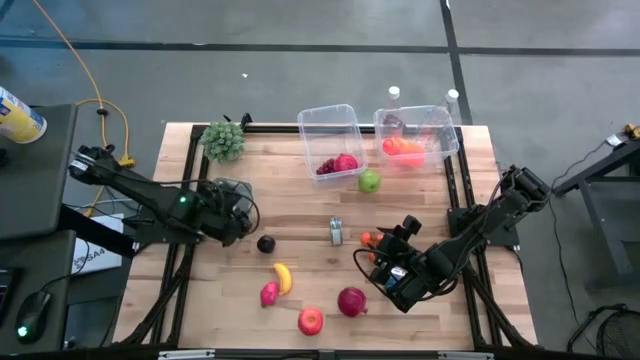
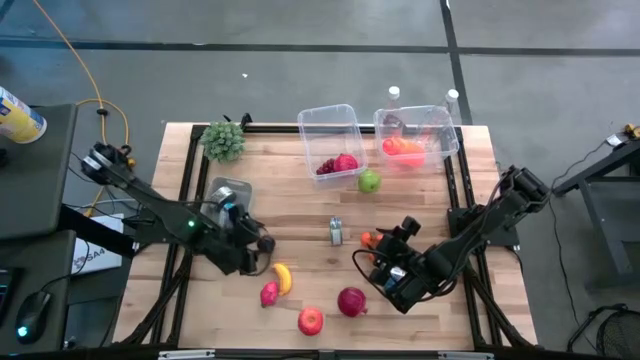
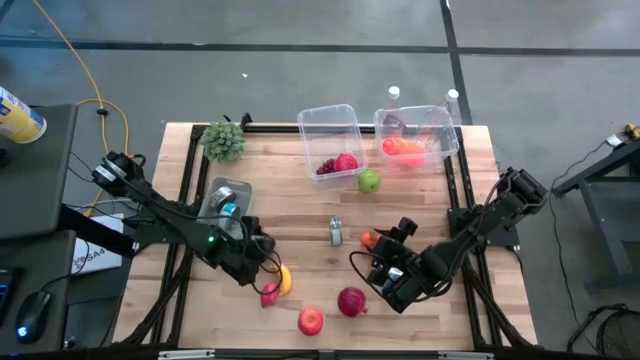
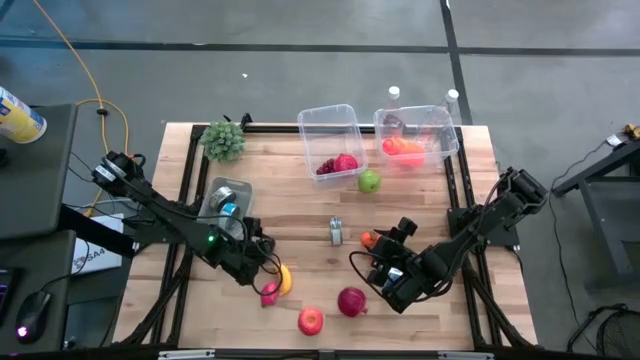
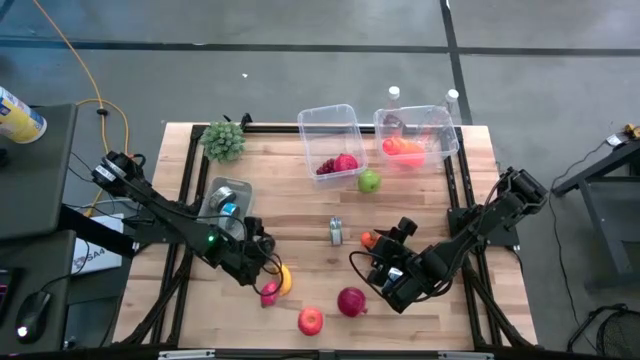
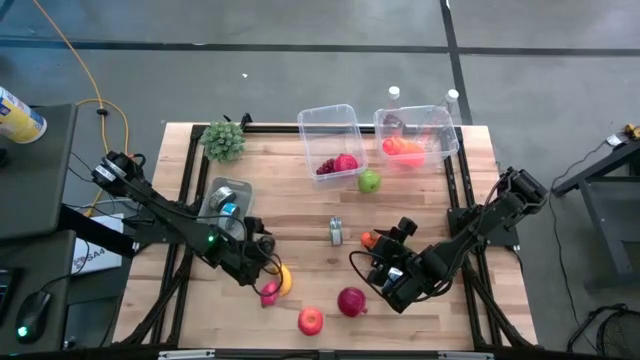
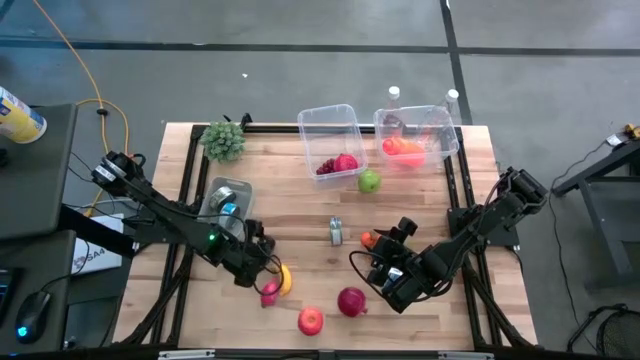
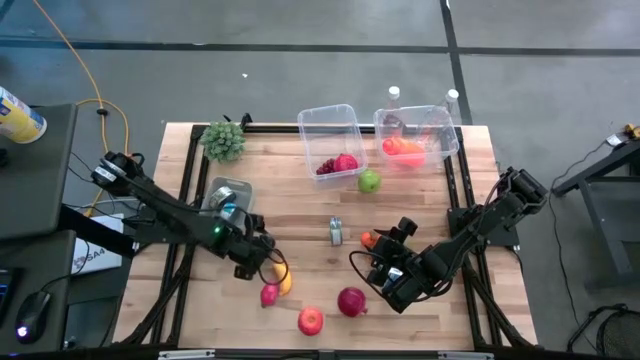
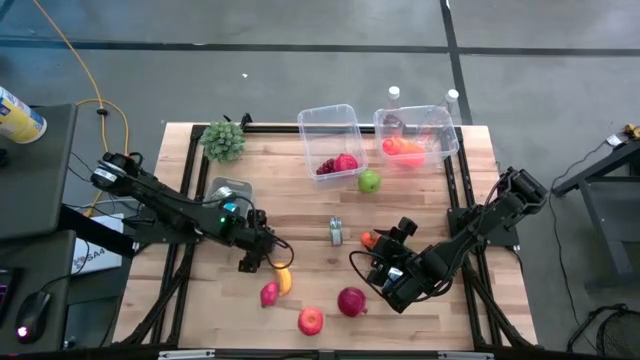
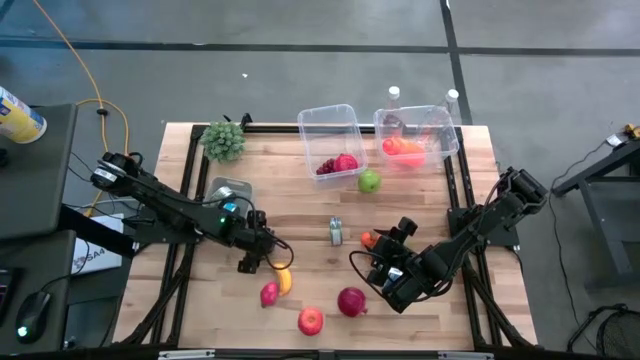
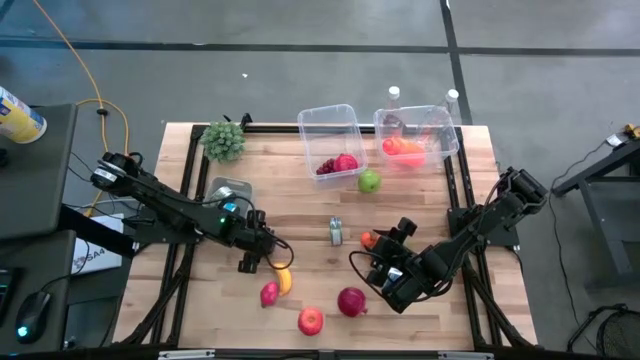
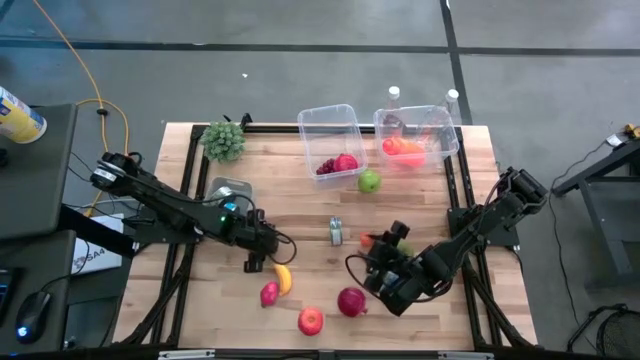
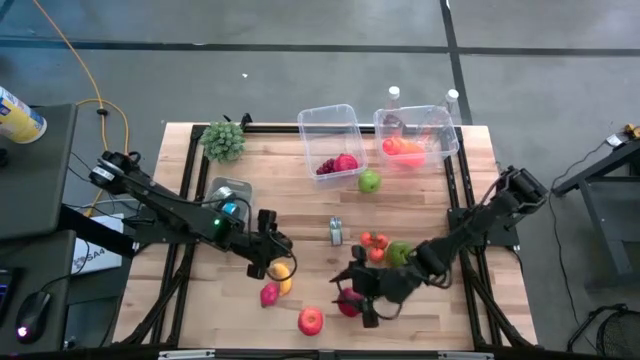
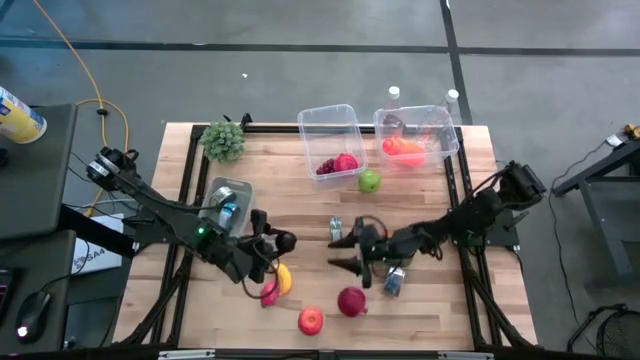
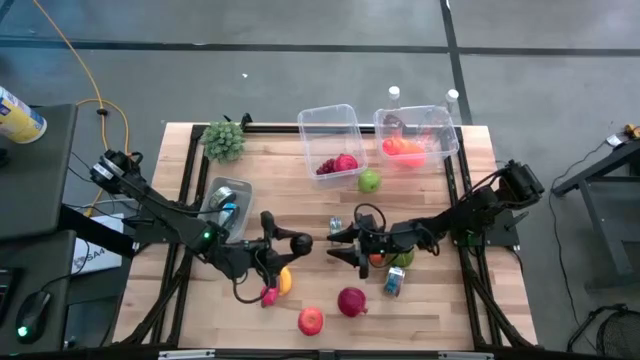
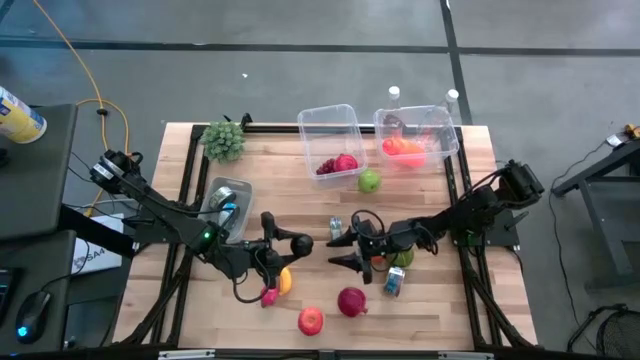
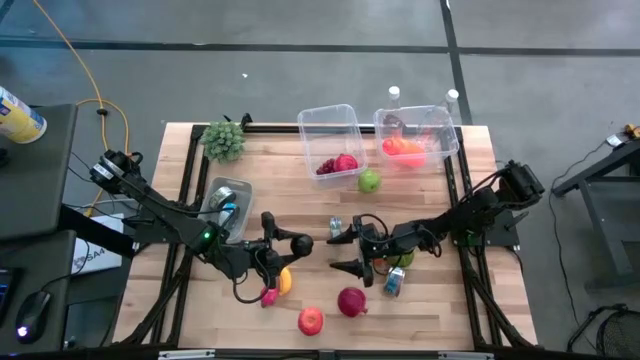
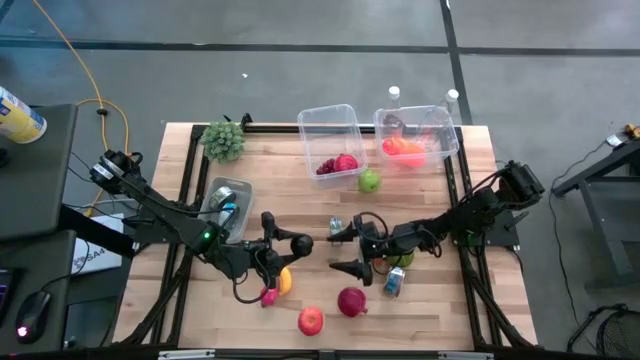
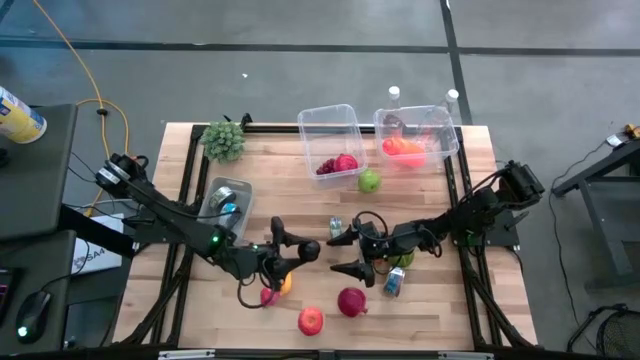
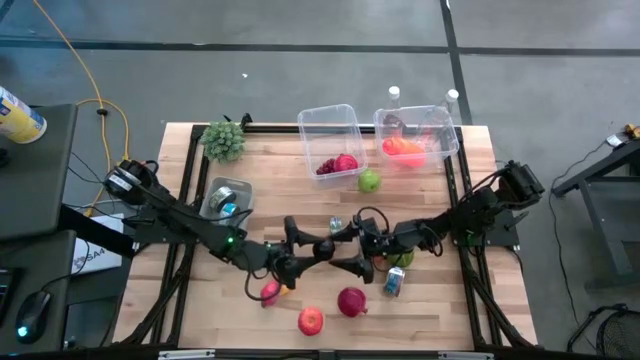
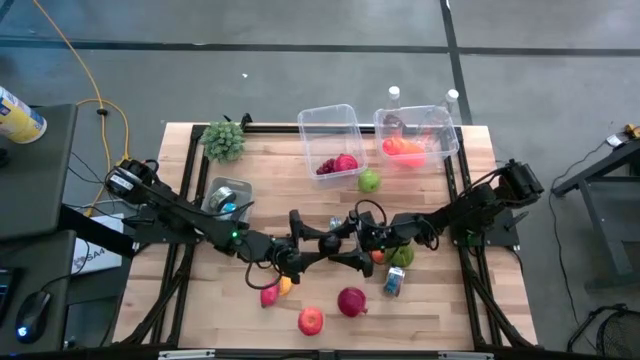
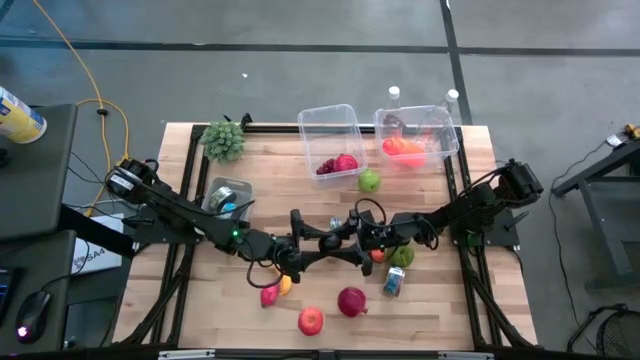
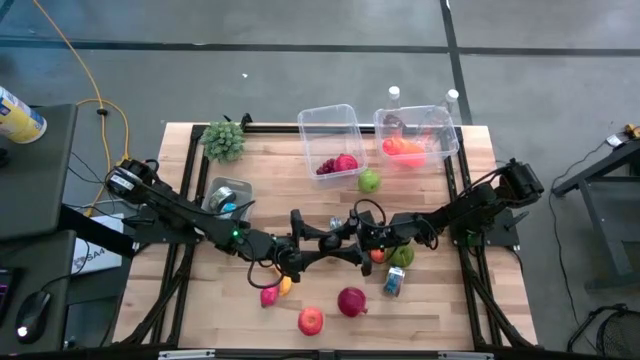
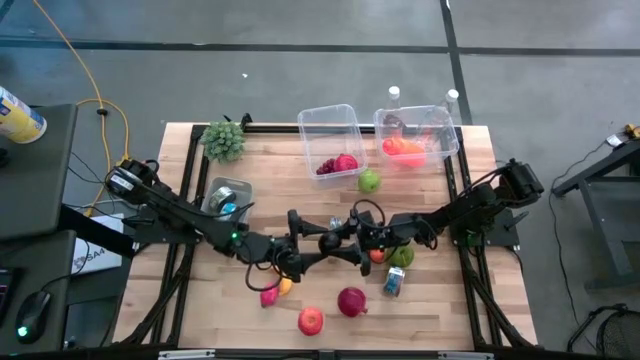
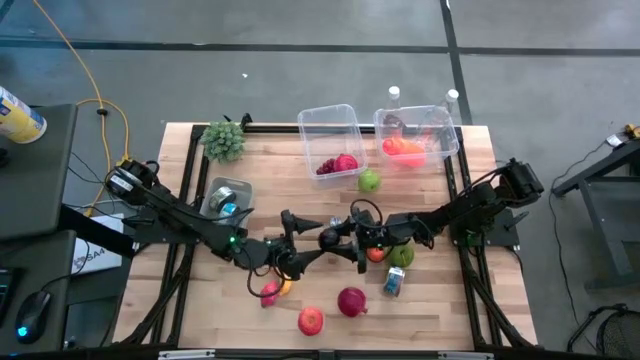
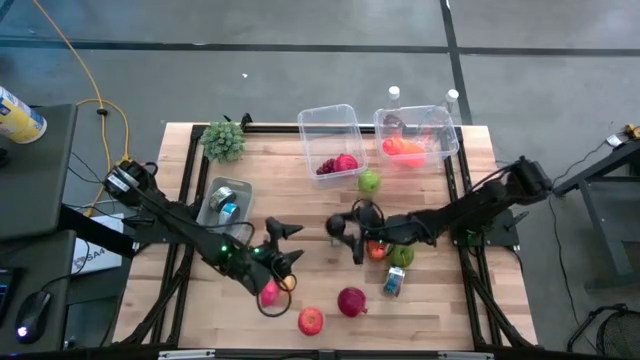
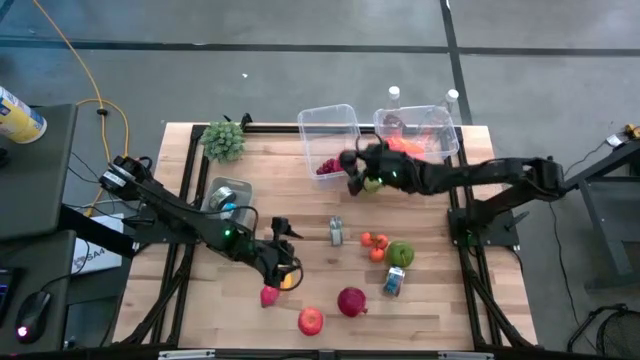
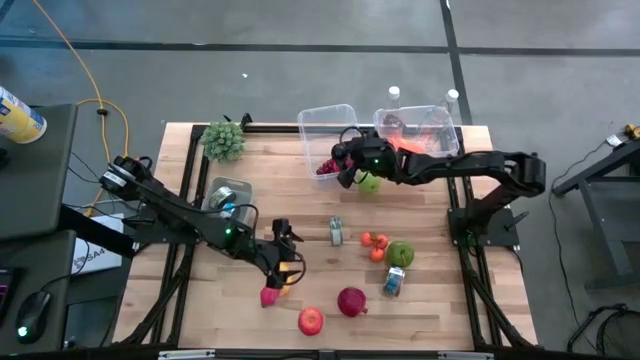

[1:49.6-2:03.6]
Task: Pick & Place Food Item
Put the plum into the left transparent bin

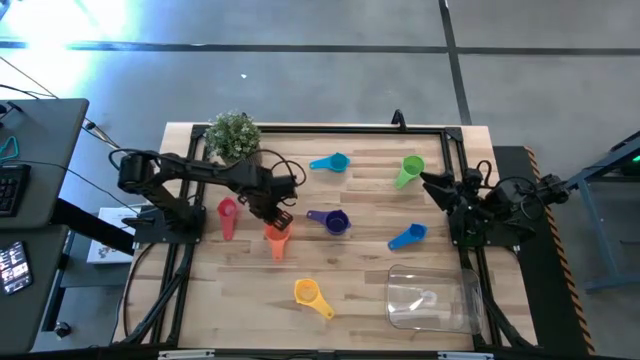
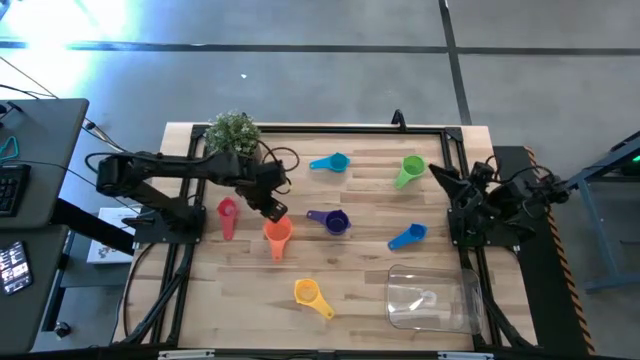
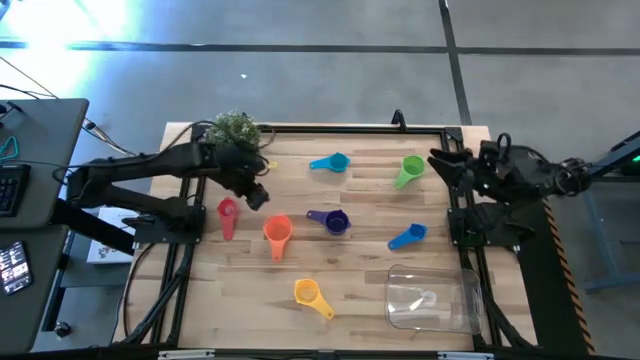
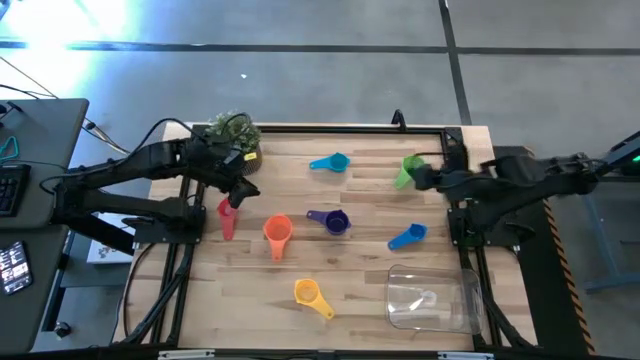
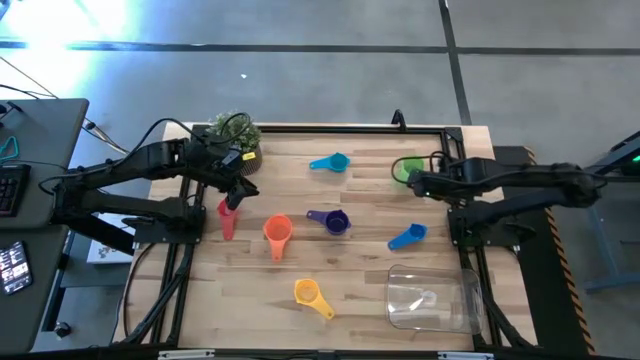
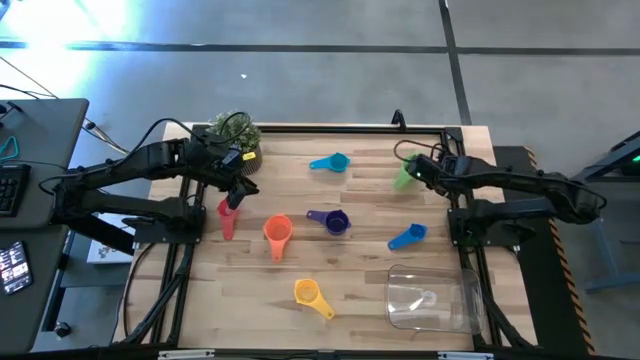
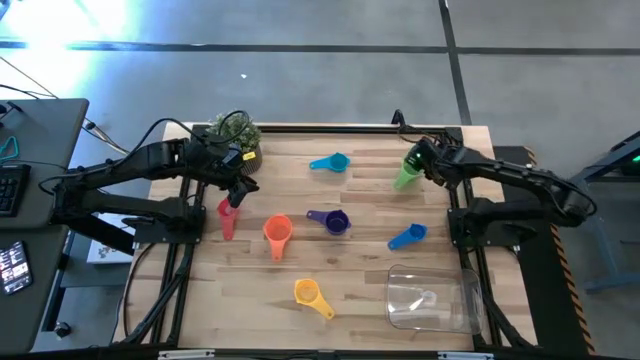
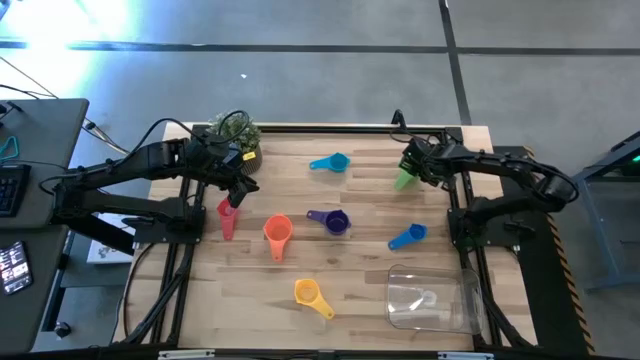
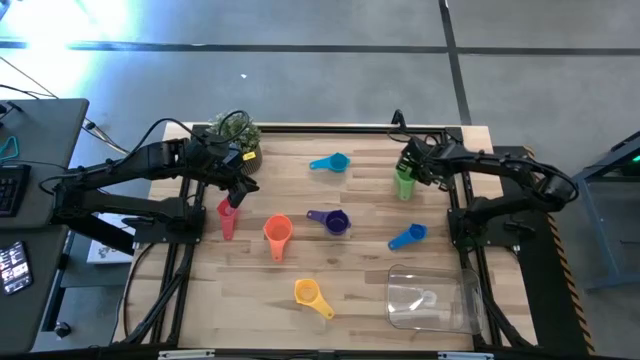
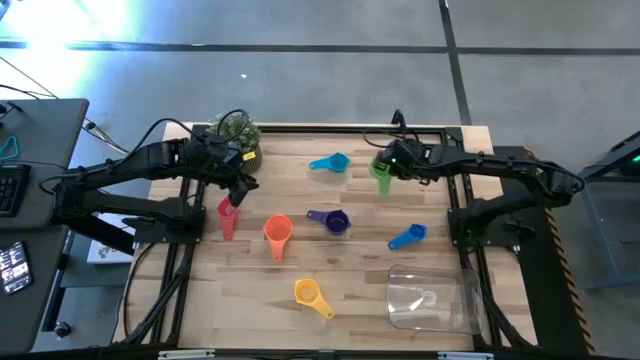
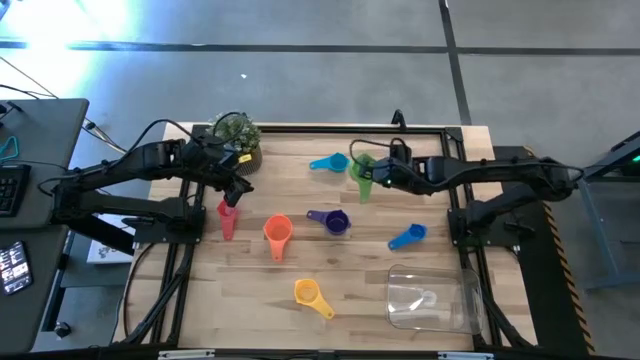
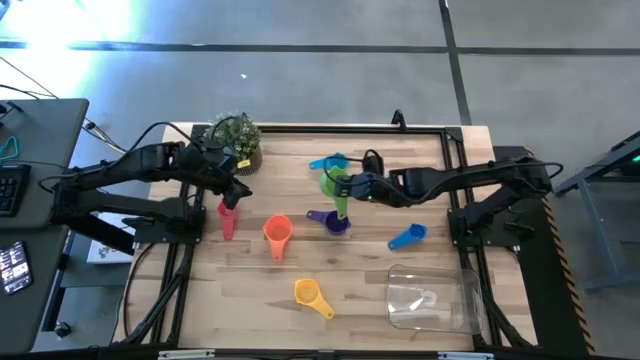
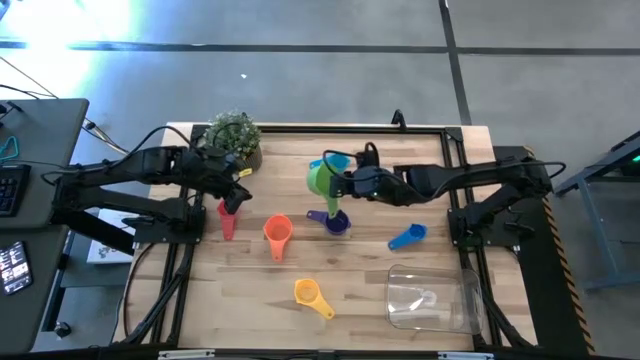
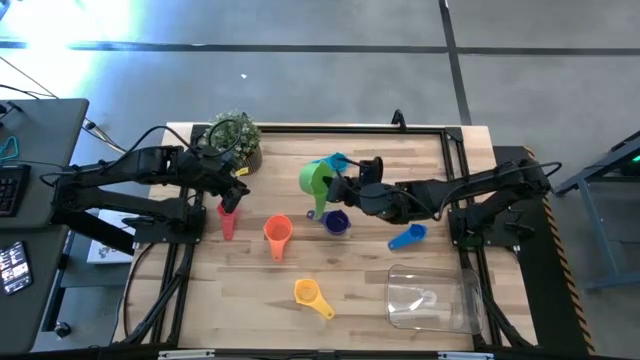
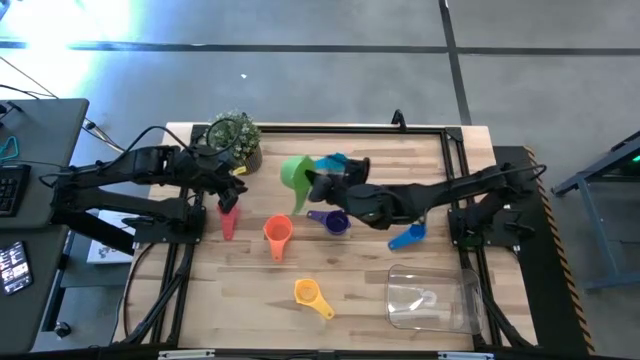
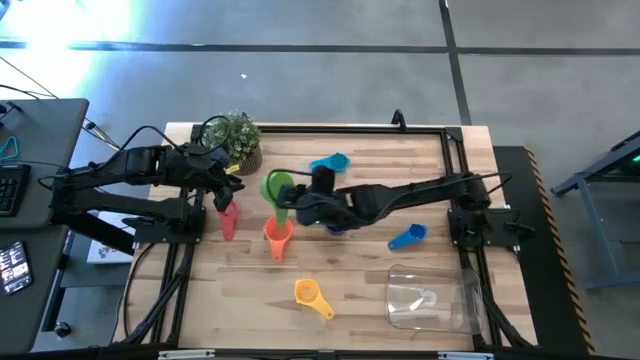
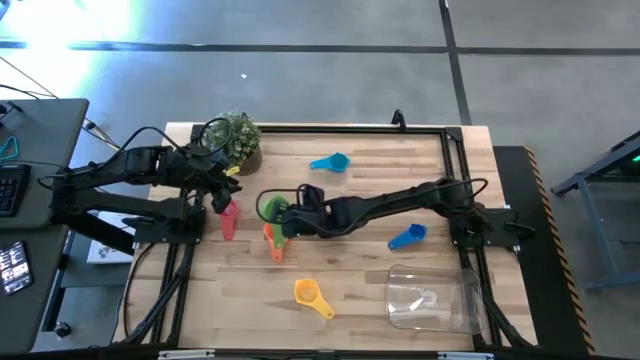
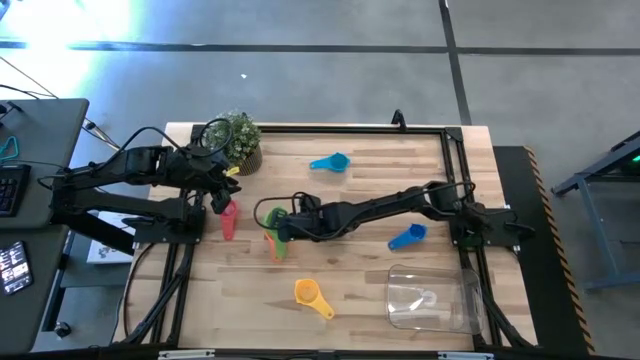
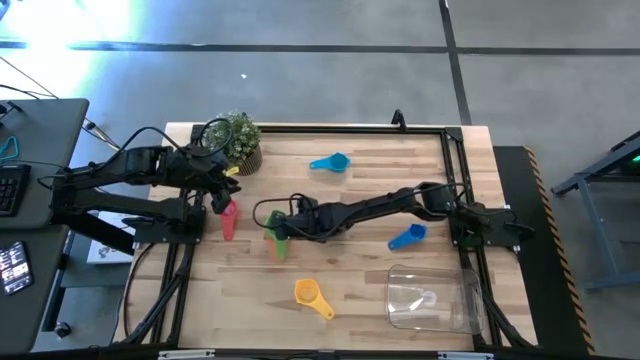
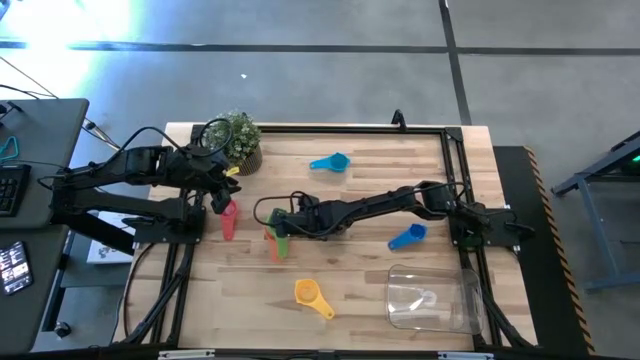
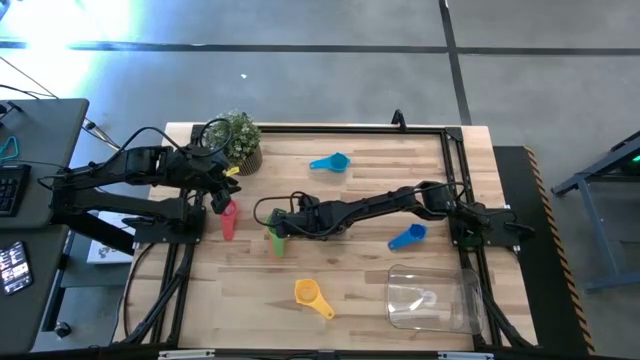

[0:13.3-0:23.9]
Task: Nest measuring cups in basket
Stack the green measuring cup on top of the orange measuring cup
